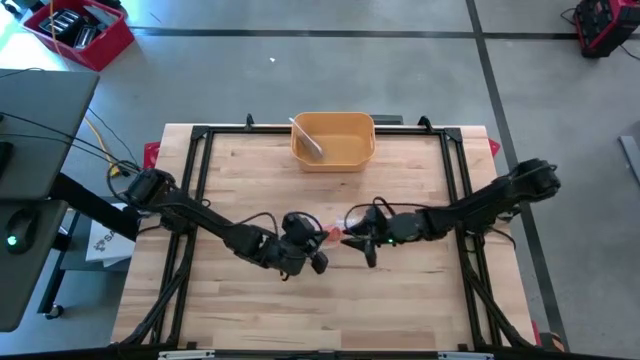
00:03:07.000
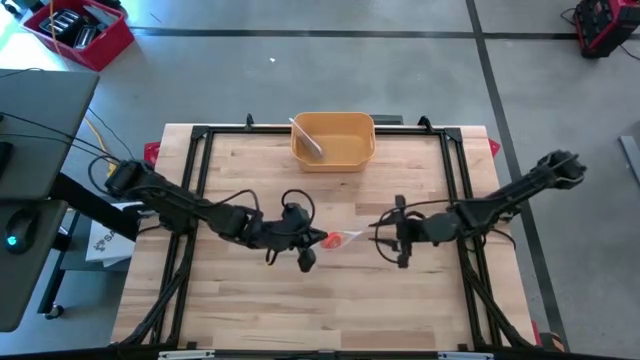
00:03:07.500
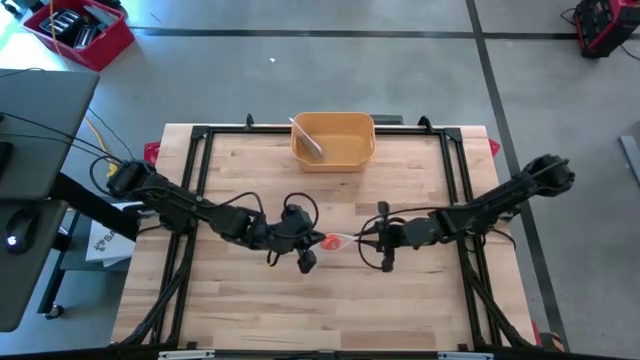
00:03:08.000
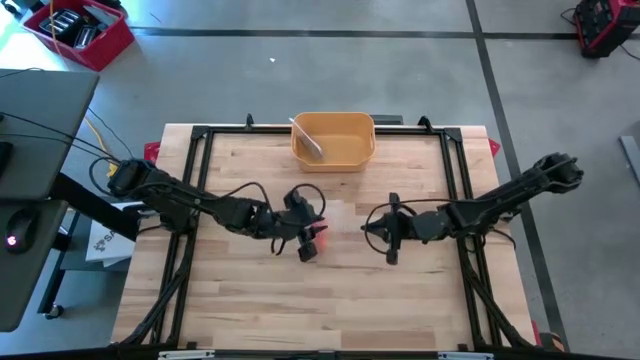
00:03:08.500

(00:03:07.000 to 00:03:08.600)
Task: Roll bandage
Close the top transparent zip bag

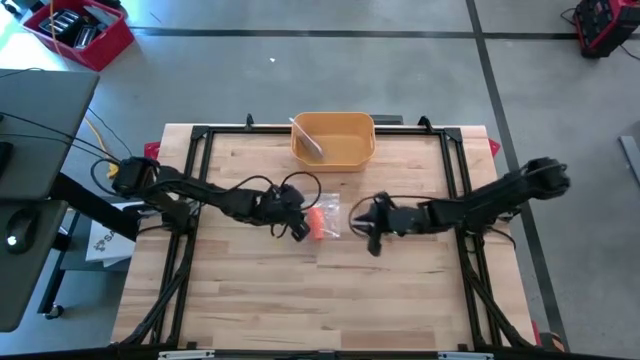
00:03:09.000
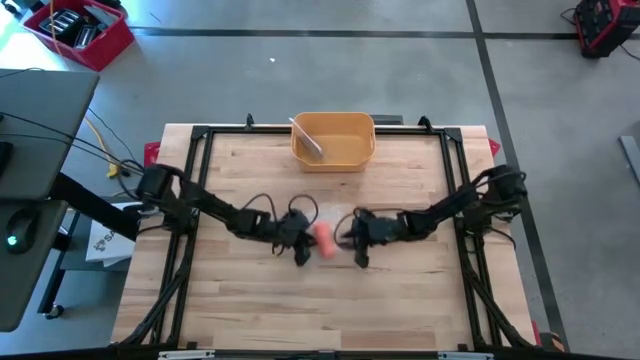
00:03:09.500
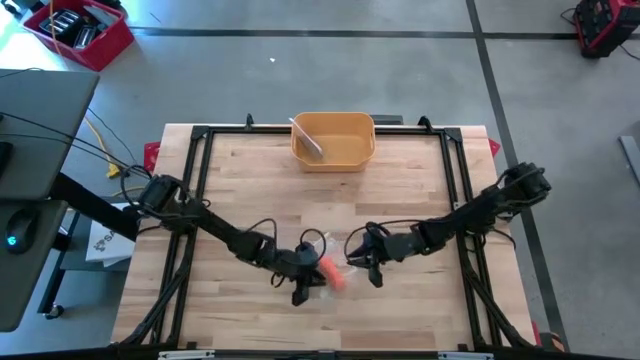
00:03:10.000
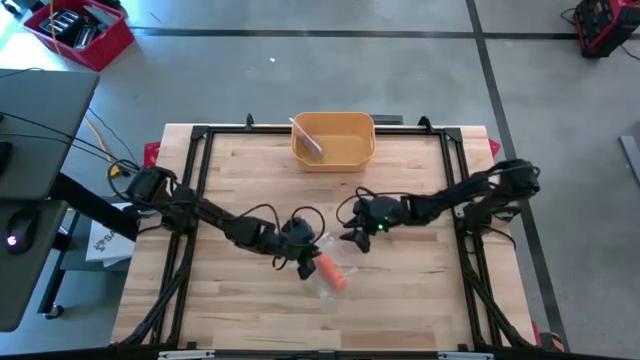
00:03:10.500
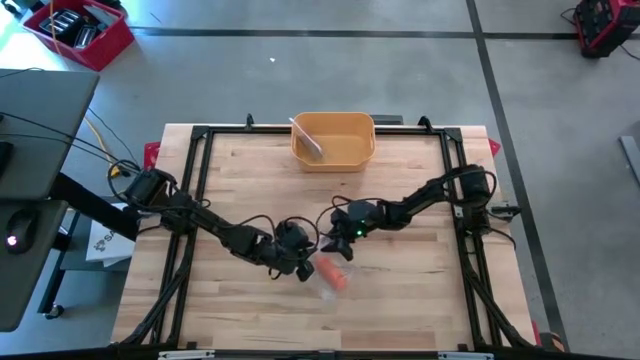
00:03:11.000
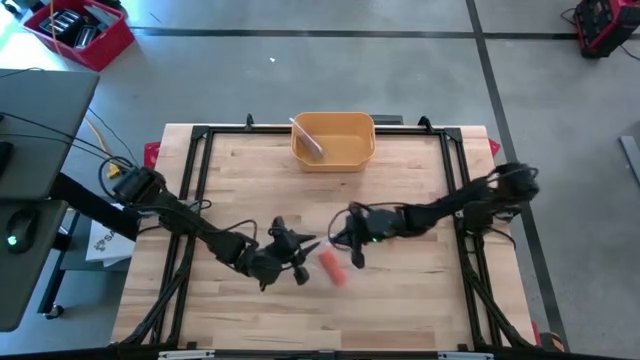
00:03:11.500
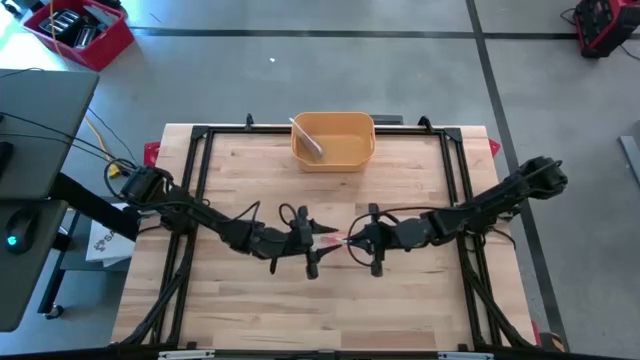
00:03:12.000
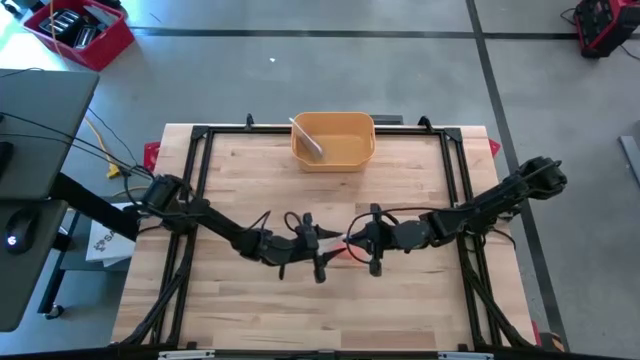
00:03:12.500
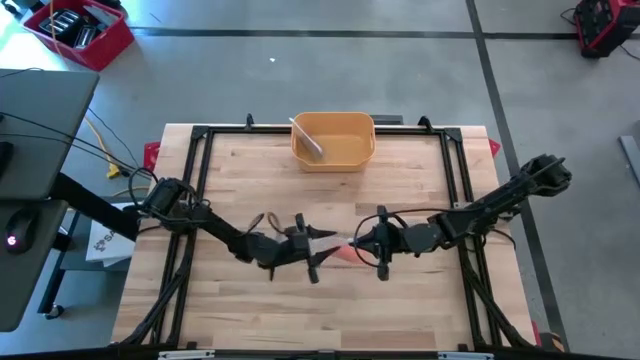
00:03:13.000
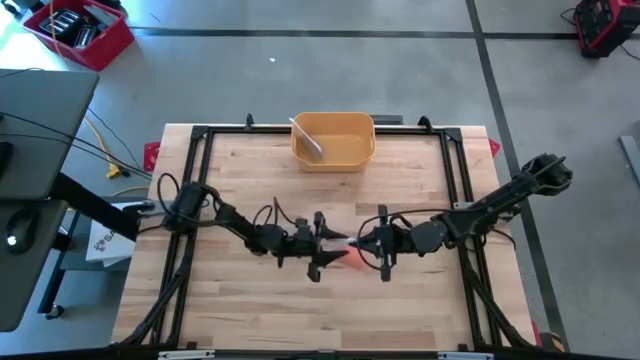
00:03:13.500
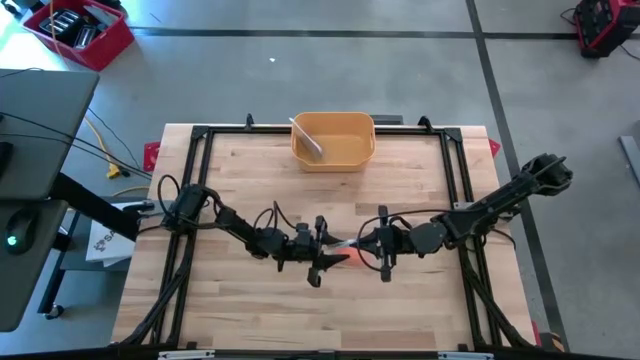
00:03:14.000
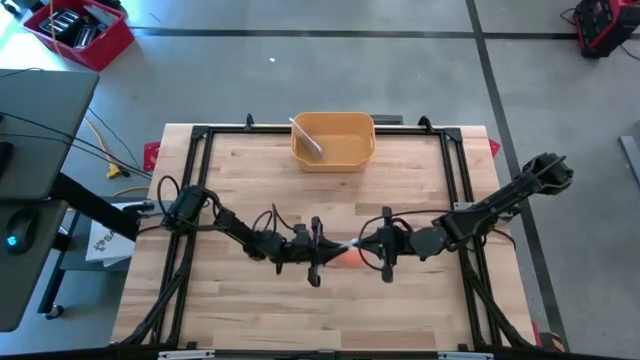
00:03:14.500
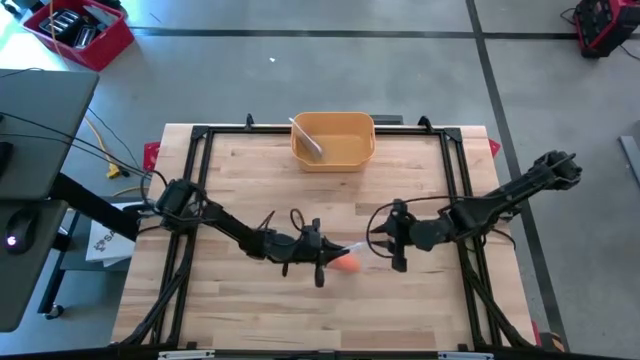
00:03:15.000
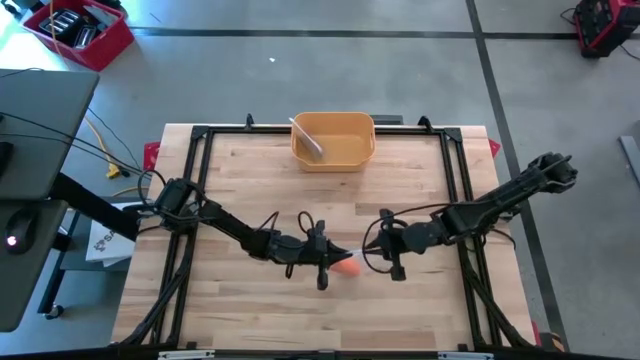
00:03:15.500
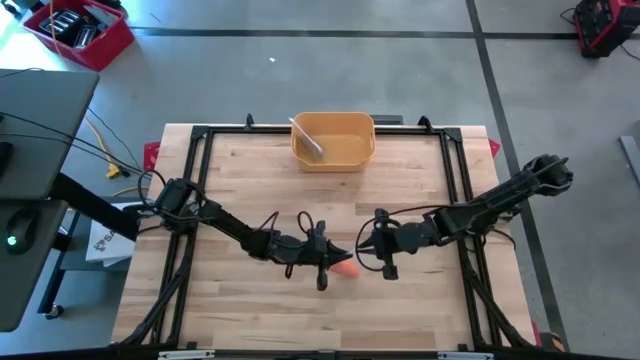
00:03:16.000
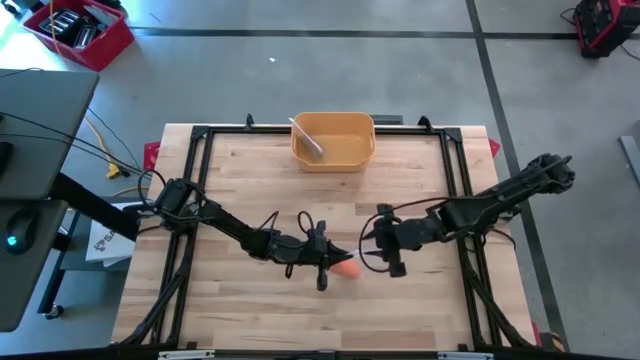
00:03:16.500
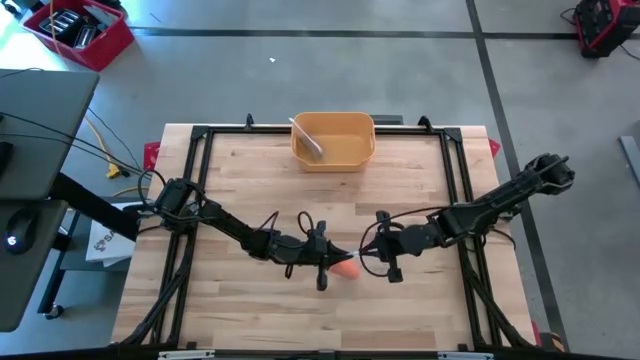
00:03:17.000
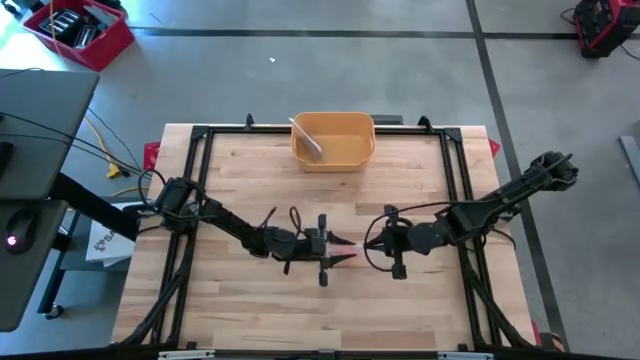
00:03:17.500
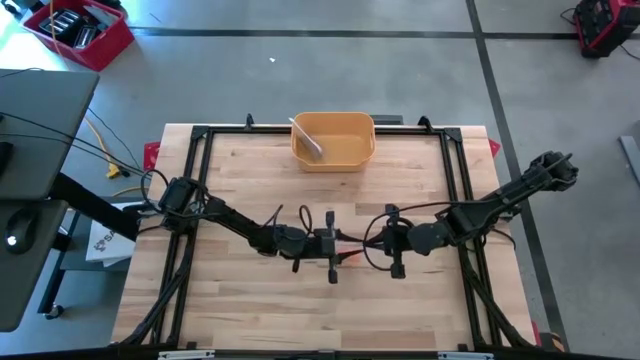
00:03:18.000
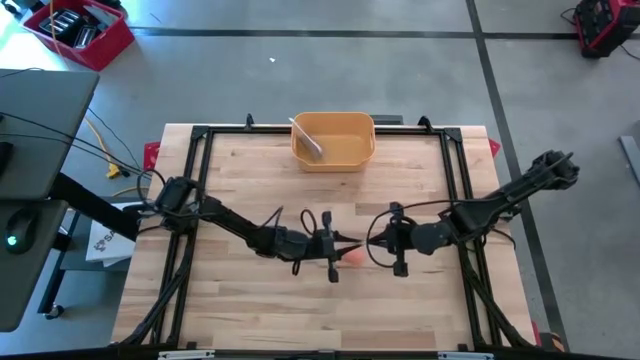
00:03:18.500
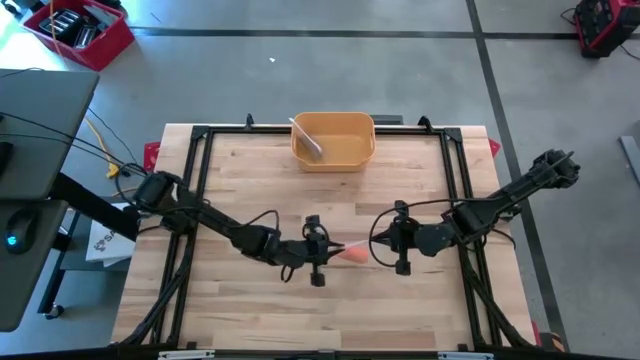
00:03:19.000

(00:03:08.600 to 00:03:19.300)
Close the top transparent zip bag

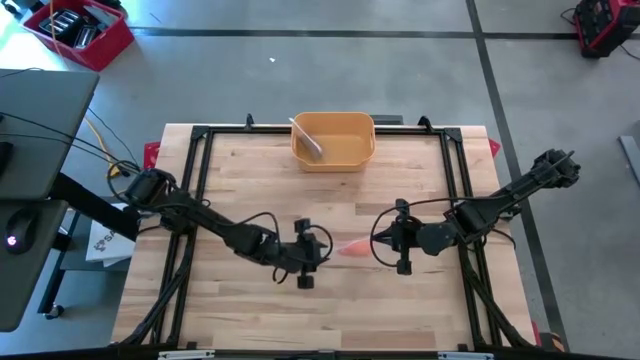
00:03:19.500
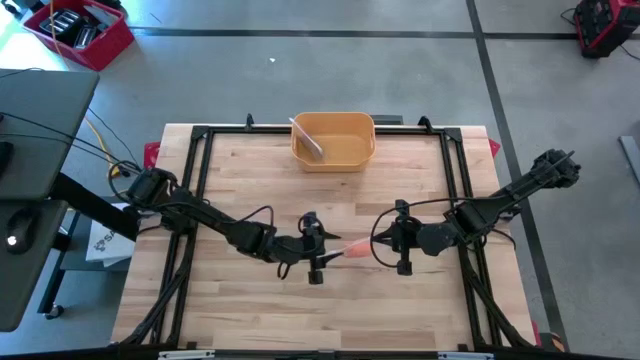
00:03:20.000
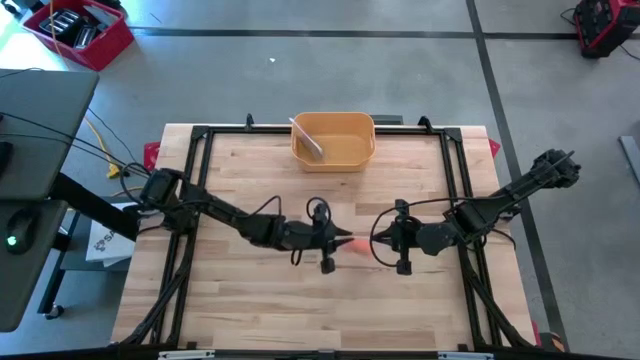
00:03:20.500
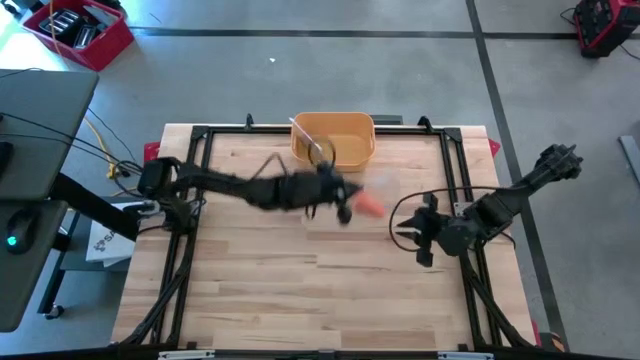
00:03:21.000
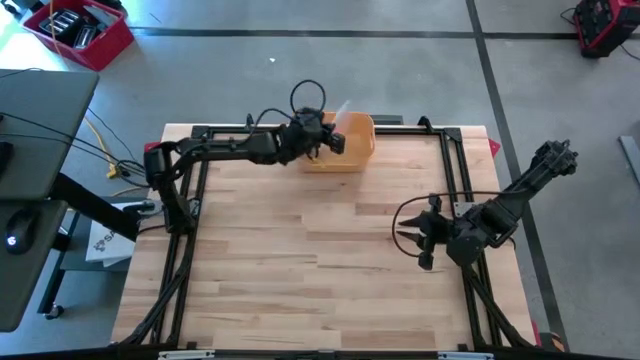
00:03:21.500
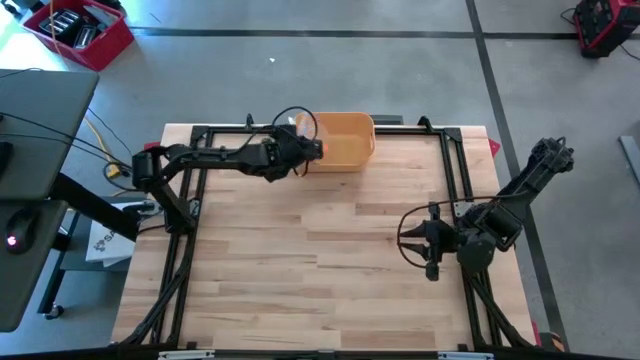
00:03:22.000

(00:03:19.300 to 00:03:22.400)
Put the top transparent zip bag with the rolled orange bandage into the yellow bin

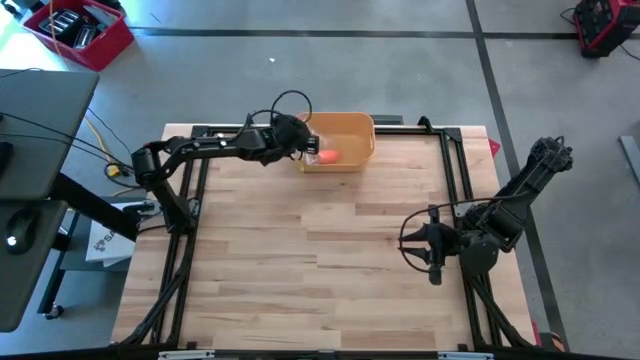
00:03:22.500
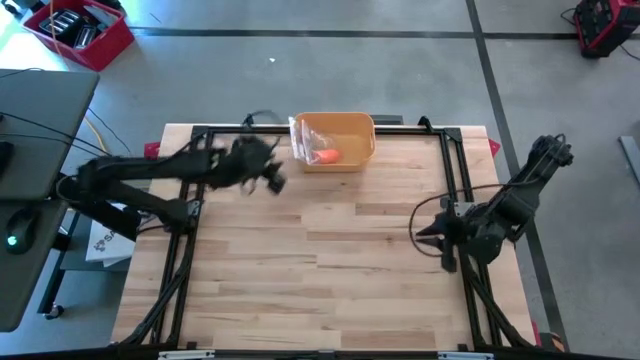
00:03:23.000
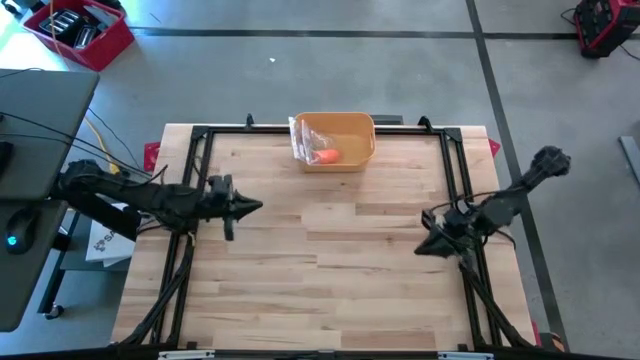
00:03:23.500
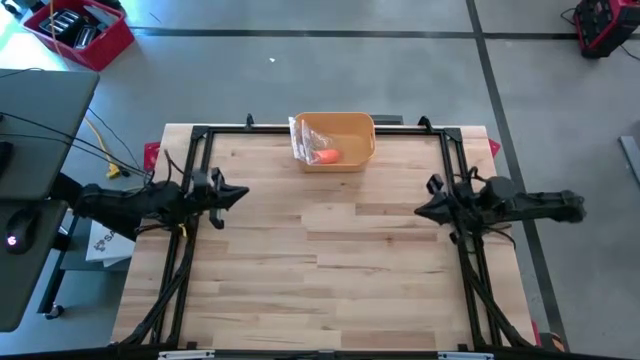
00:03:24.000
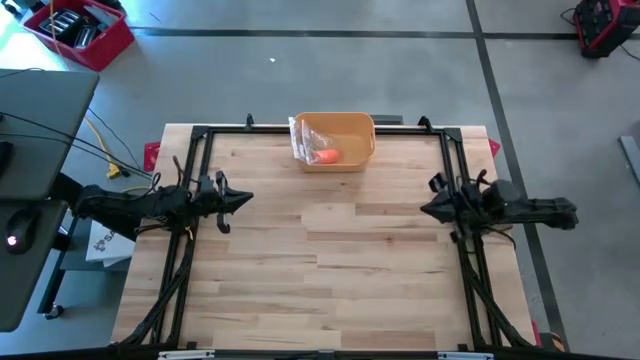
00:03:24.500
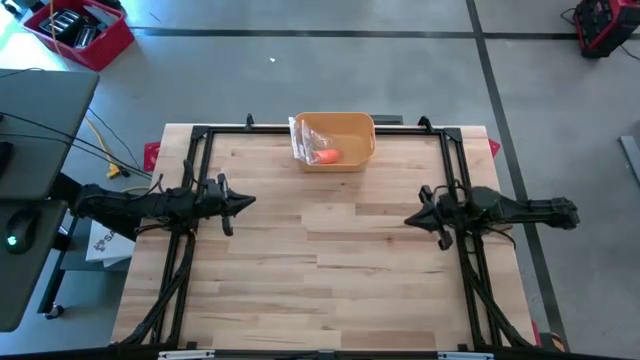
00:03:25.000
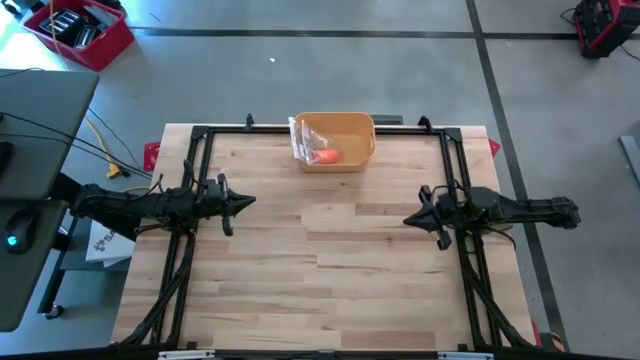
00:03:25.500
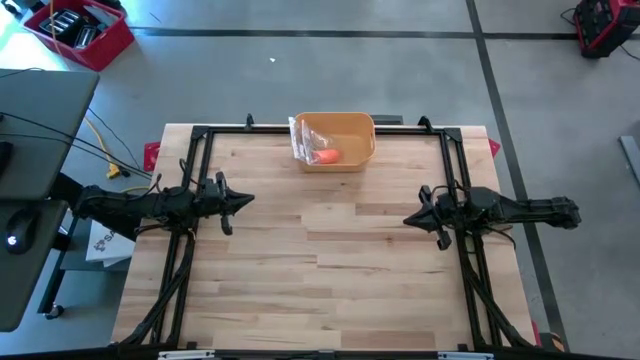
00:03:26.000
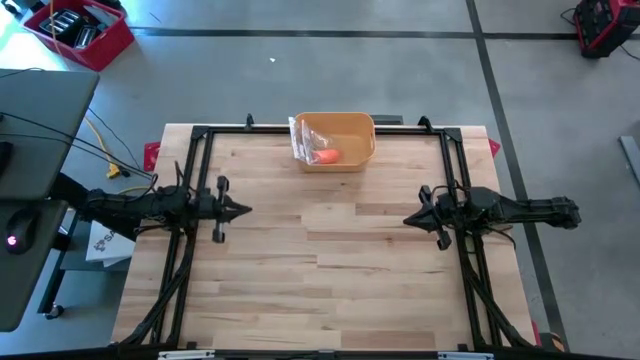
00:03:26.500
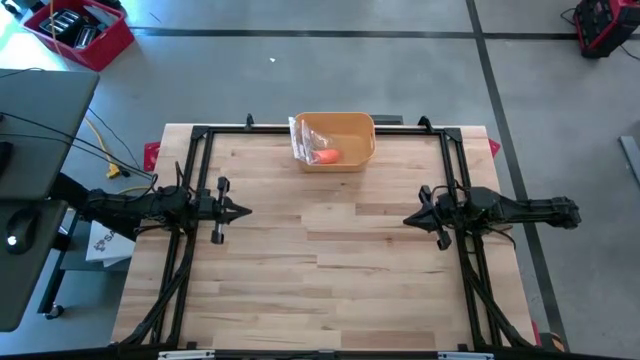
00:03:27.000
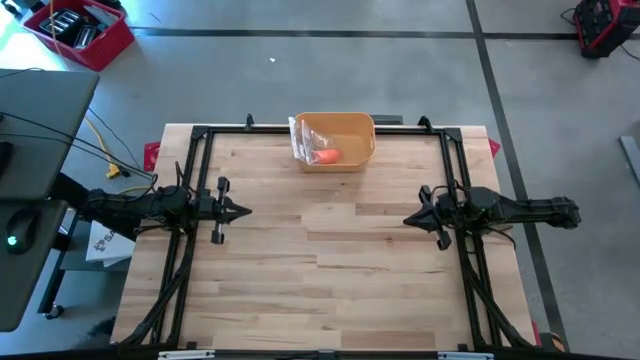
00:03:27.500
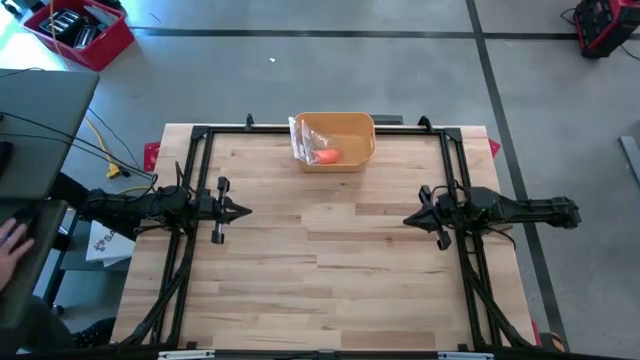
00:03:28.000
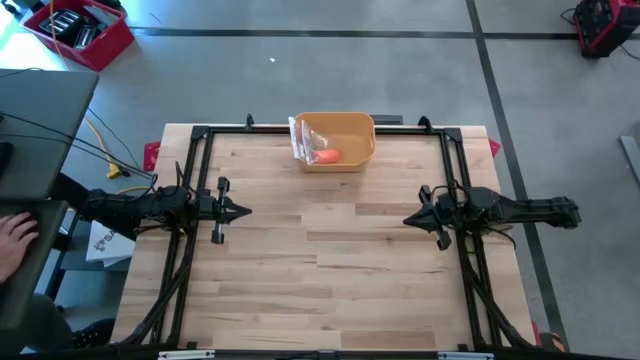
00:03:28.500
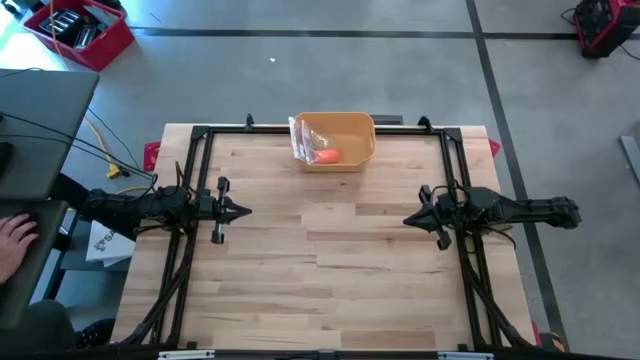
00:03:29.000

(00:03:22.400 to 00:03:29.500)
Return to Home Position
